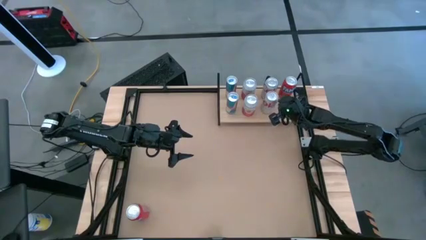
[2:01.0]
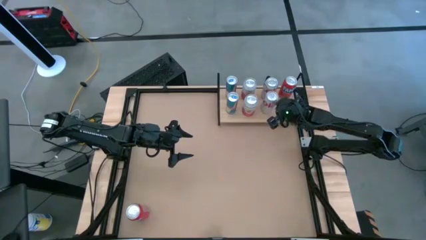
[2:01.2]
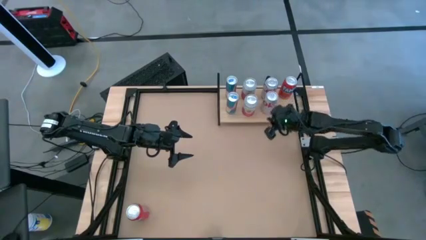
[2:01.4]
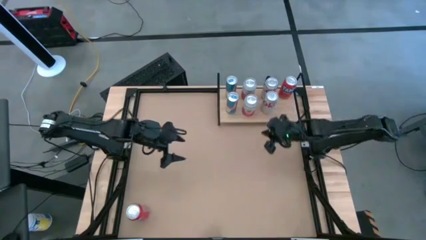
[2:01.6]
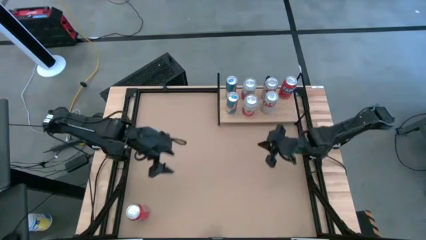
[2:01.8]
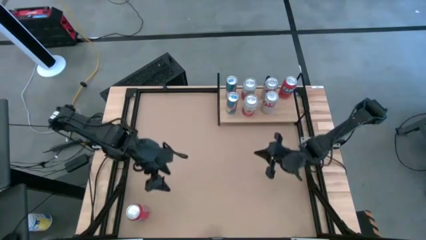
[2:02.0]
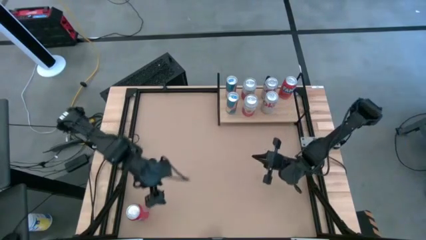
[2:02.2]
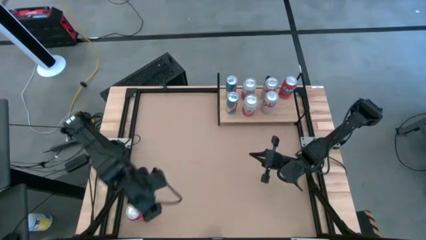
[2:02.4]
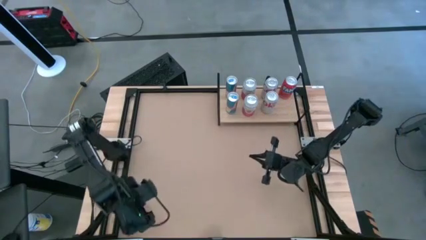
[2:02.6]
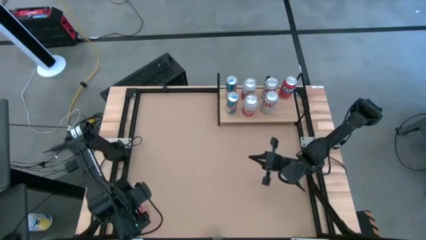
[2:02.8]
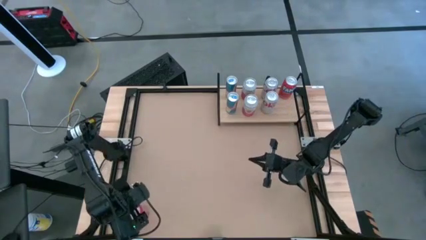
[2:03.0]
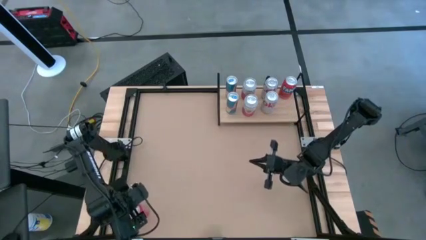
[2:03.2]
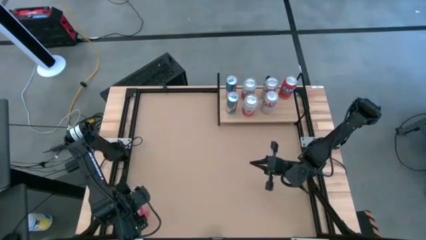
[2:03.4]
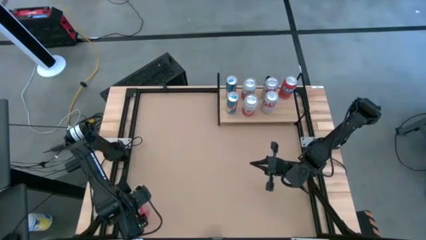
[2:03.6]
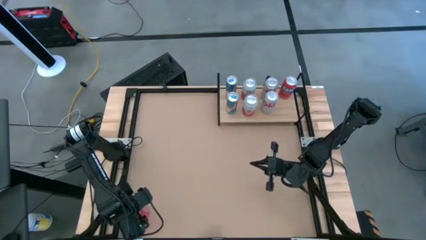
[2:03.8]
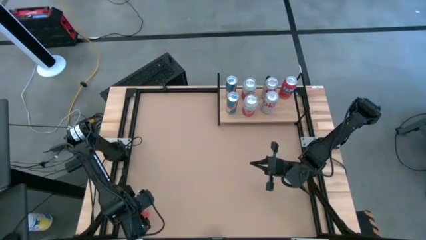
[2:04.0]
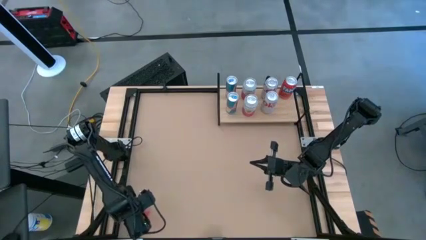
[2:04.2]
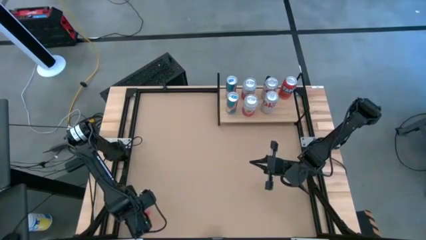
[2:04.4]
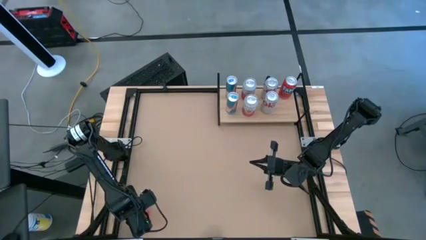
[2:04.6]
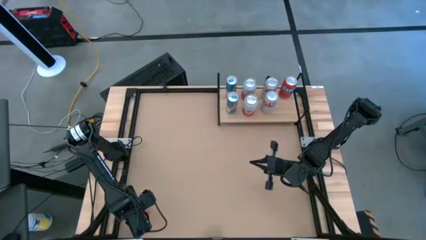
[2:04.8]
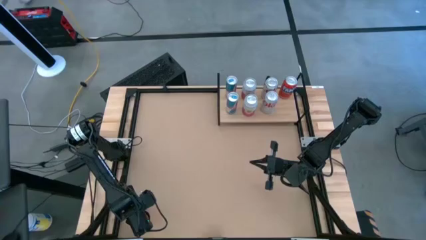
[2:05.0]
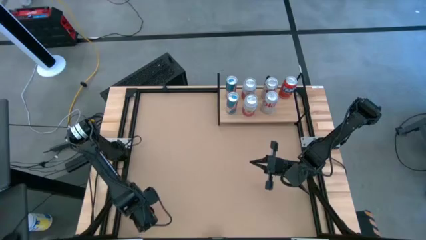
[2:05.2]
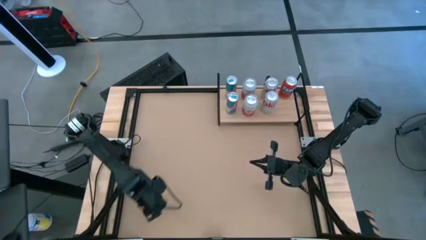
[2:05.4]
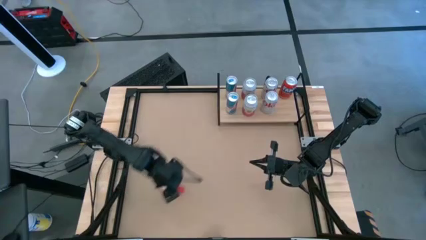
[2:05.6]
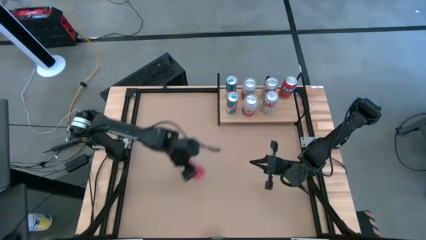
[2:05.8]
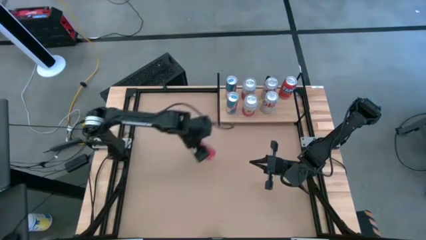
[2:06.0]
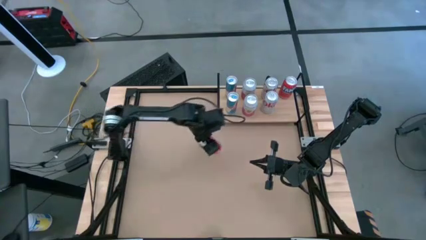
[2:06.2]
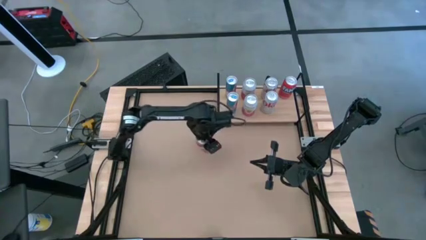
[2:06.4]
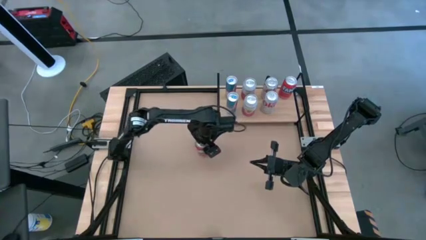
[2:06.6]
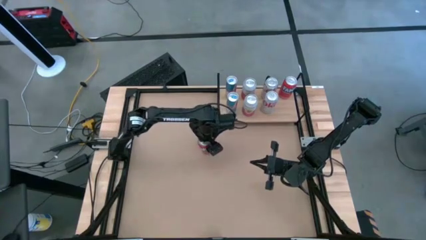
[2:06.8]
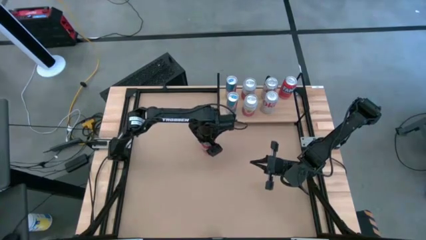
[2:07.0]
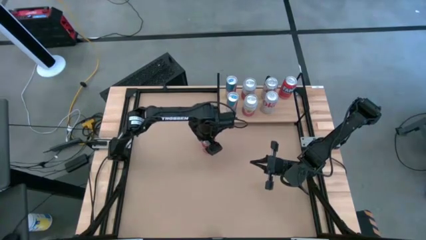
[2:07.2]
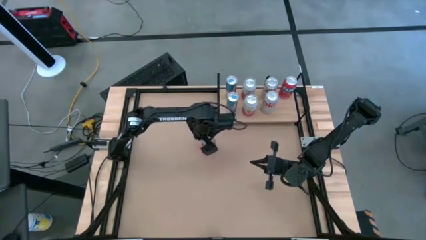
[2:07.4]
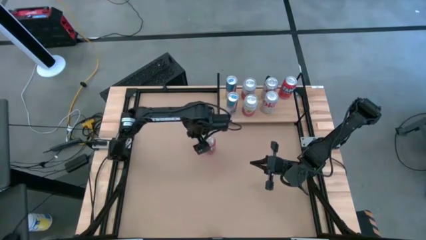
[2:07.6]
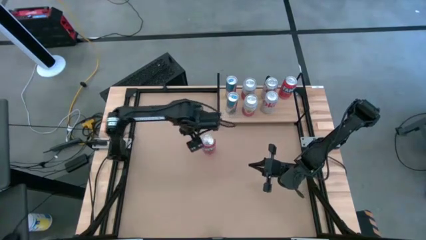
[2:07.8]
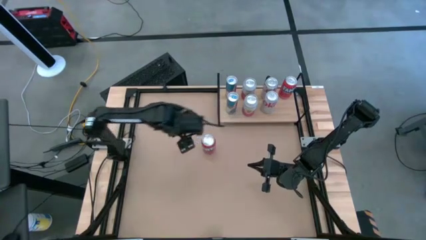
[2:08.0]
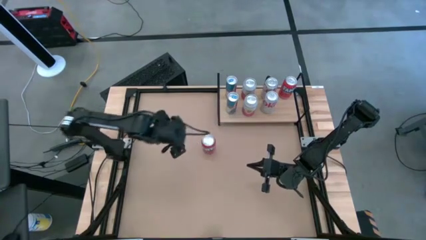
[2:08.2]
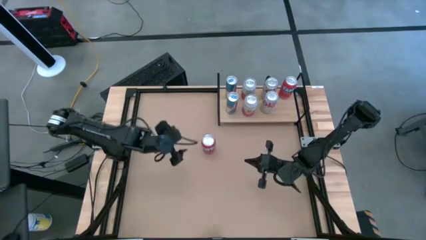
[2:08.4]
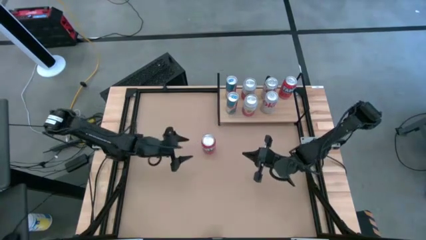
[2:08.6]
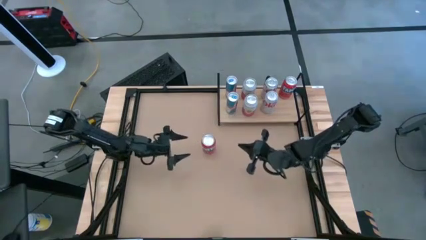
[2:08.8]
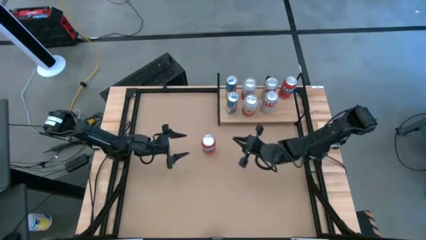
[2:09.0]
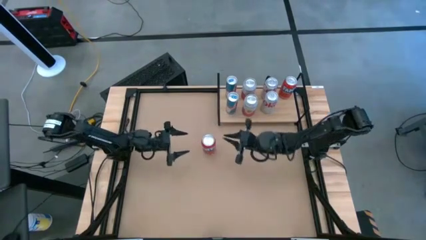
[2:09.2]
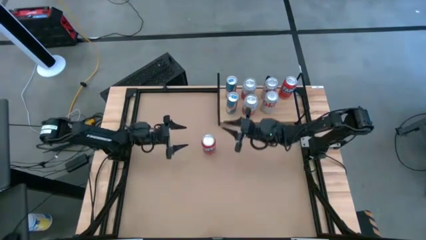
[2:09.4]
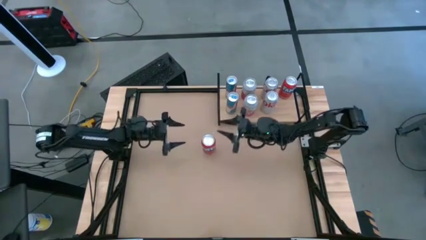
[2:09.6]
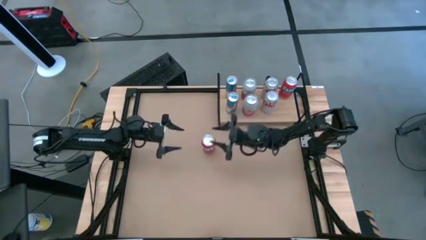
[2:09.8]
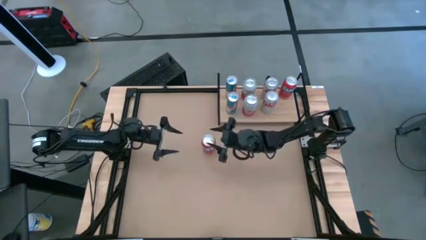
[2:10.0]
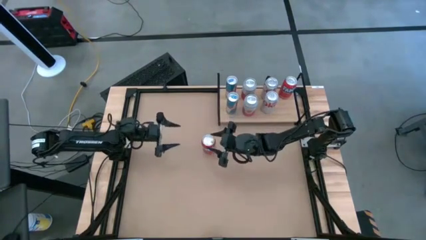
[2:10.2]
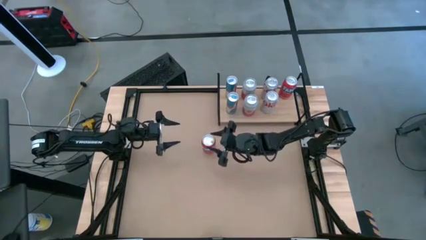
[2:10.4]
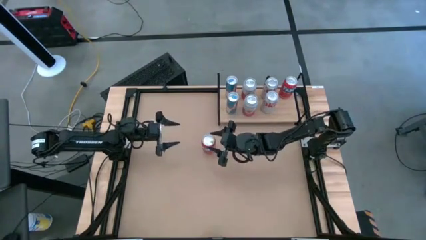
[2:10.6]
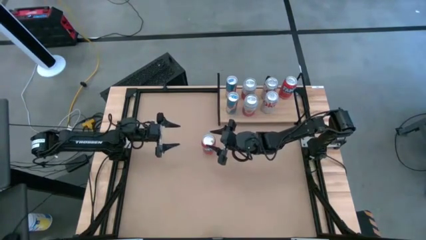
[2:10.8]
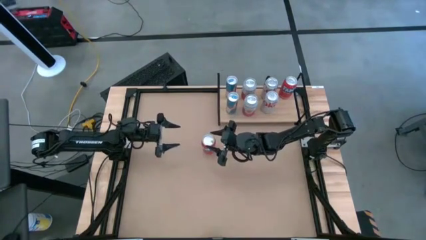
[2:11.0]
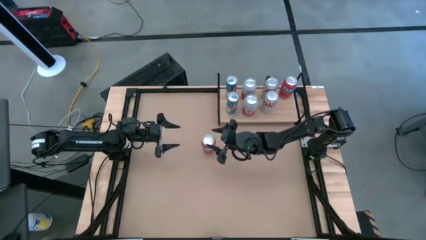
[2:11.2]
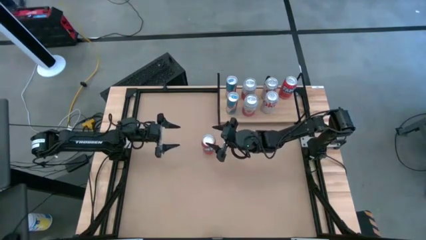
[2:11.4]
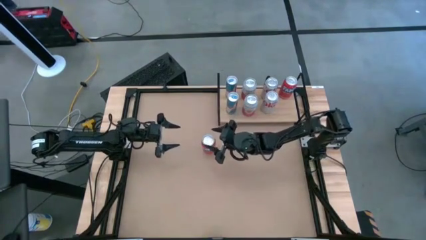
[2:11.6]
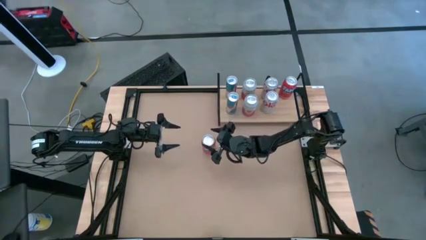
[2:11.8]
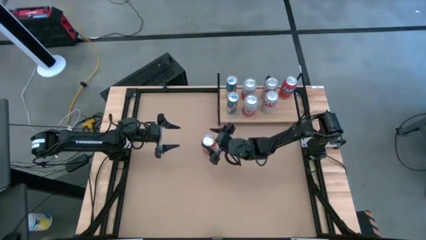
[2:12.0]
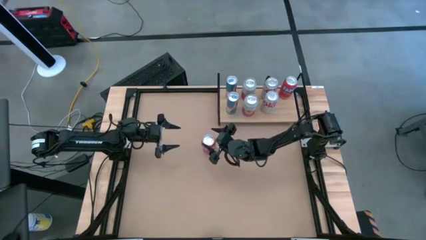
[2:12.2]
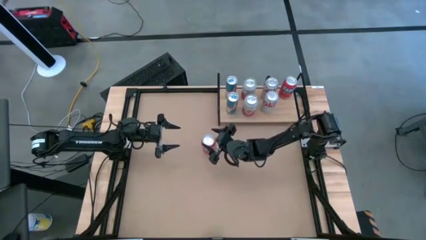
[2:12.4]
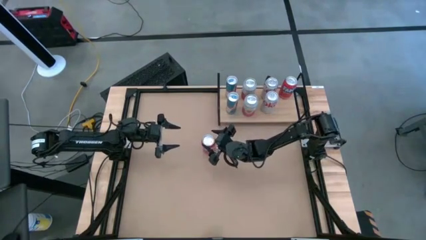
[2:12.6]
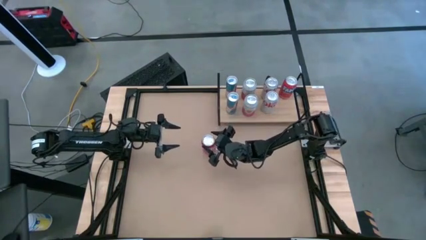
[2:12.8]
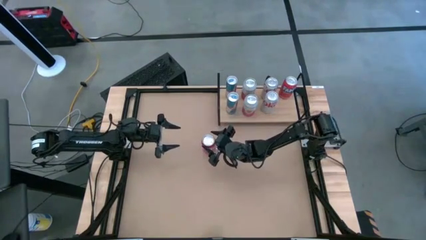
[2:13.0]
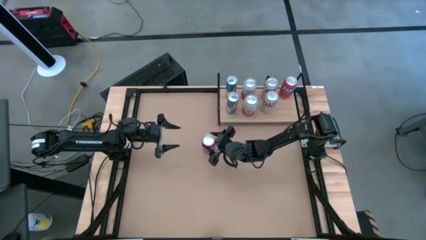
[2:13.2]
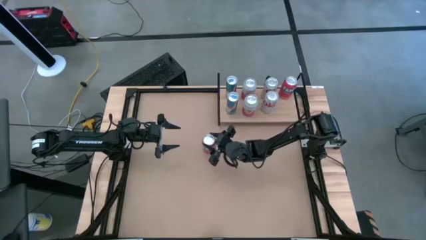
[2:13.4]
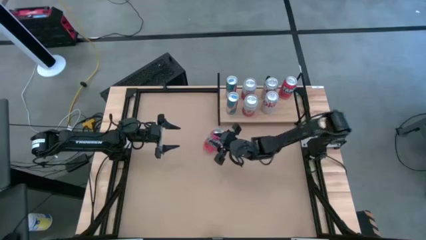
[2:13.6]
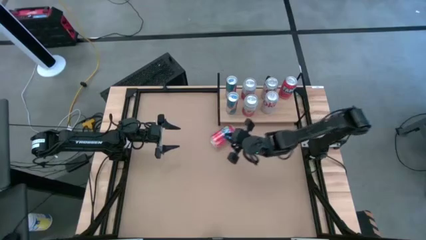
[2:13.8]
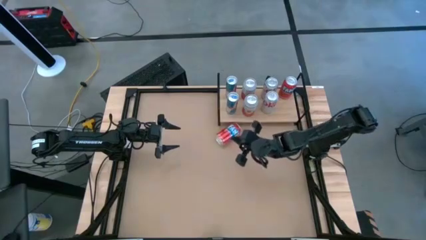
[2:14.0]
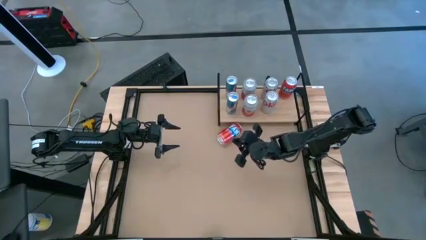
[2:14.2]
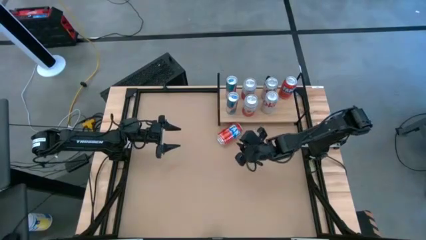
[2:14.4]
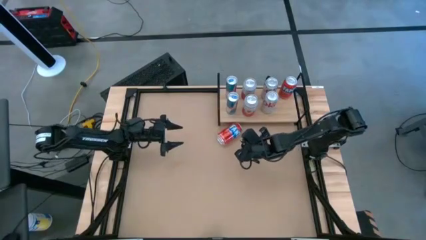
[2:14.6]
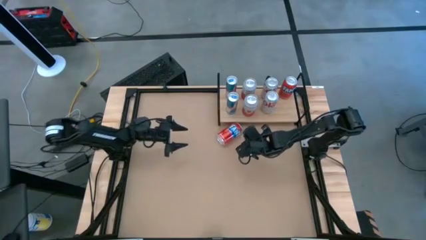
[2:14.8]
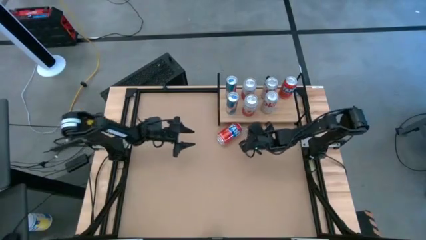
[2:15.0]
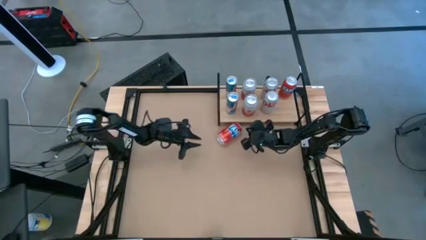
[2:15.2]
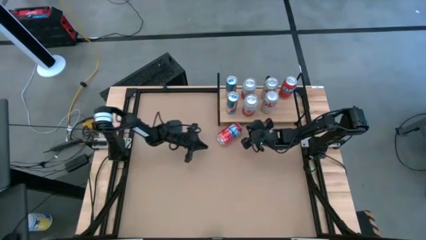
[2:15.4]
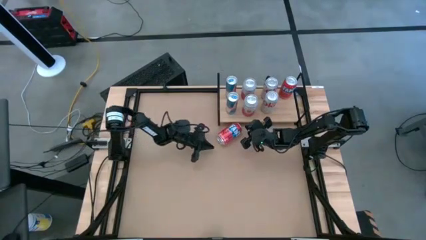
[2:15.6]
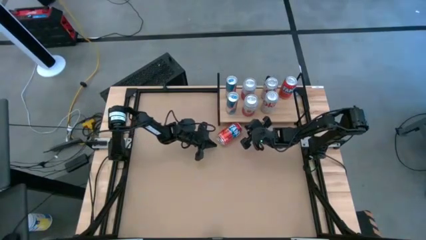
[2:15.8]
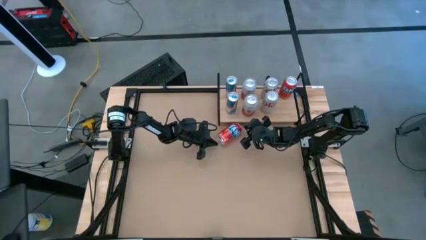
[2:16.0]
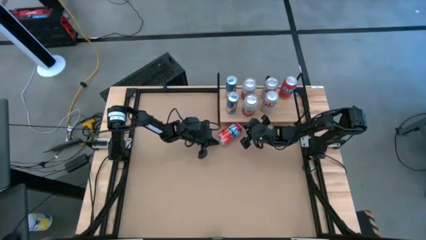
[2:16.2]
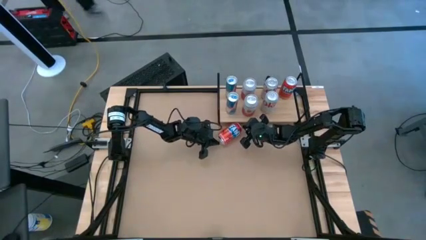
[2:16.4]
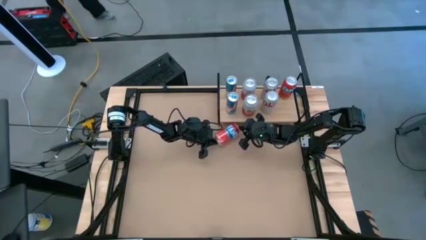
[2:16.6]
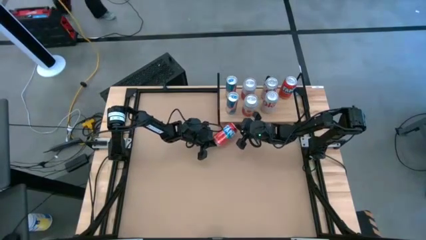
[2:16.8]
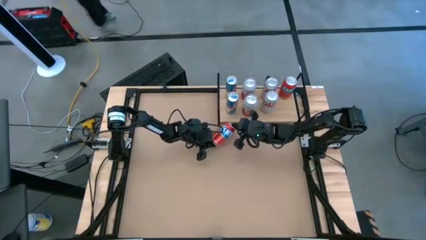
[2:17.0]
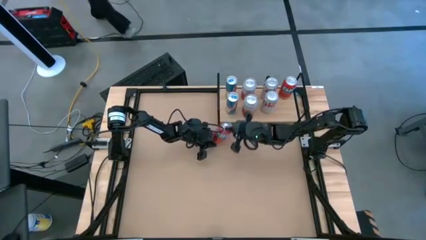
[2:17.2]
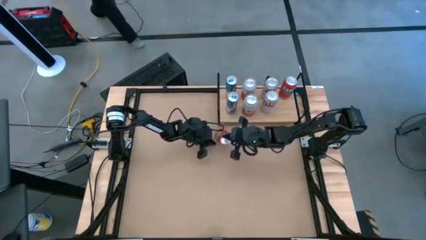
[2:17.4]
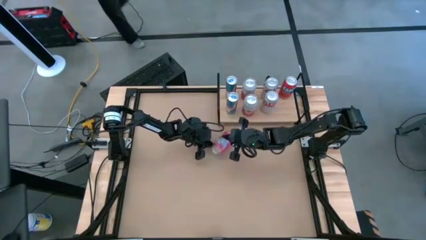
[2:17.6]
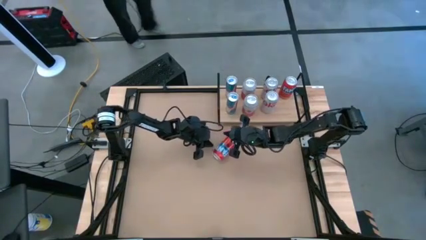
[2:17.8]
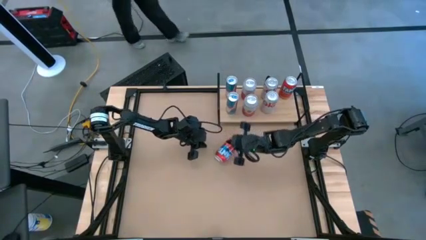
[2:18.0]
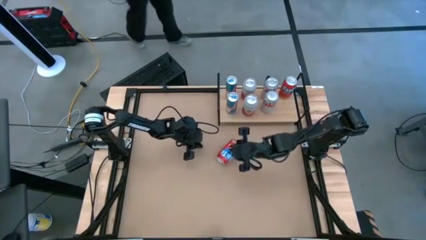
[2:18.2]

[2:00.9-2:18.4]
Task: Place canned beverage on shelf
Put the orange soda can on the shelf aligned with the orange soda can
